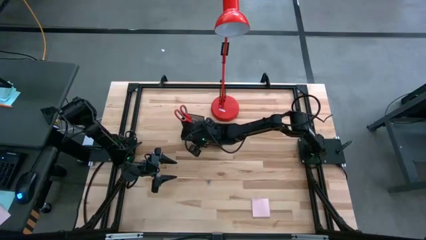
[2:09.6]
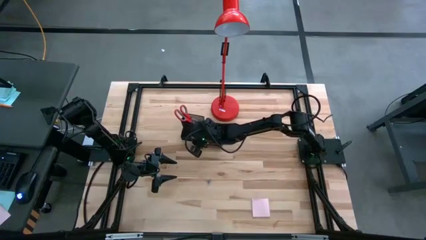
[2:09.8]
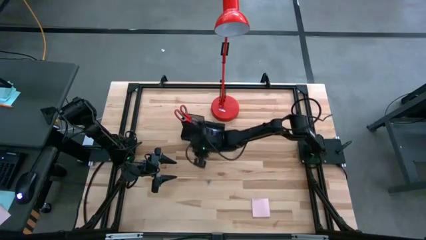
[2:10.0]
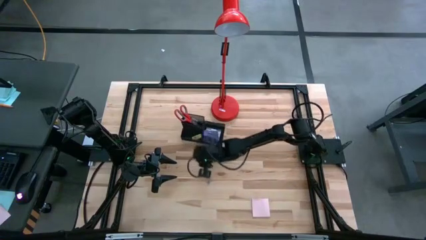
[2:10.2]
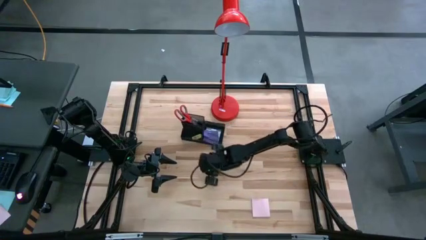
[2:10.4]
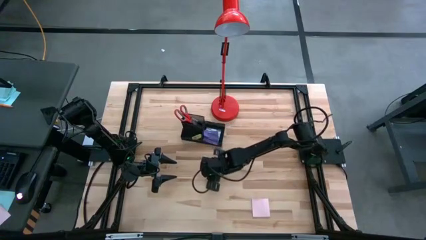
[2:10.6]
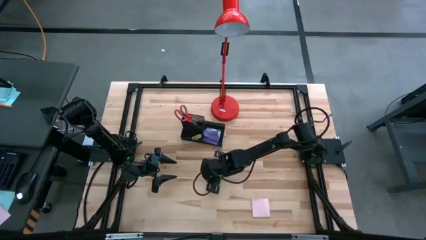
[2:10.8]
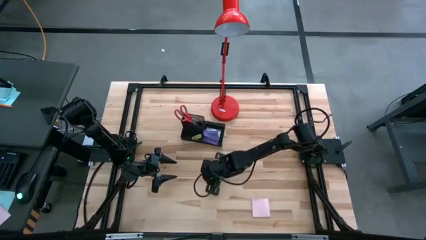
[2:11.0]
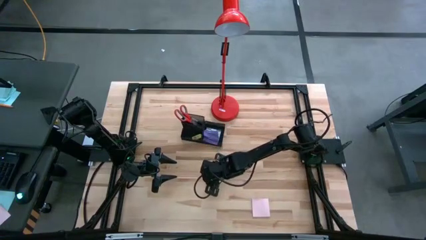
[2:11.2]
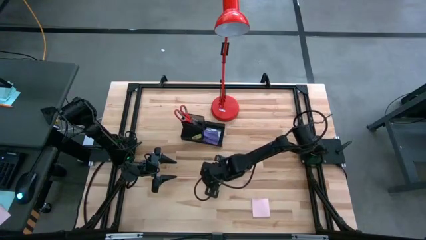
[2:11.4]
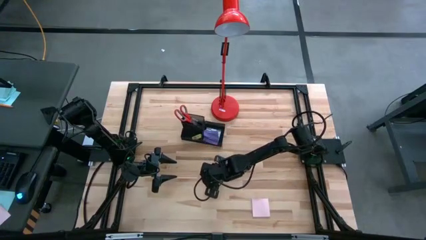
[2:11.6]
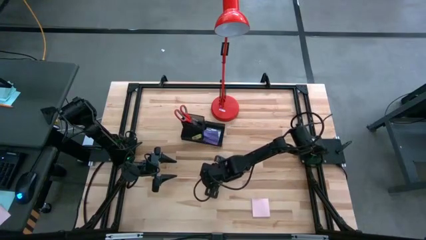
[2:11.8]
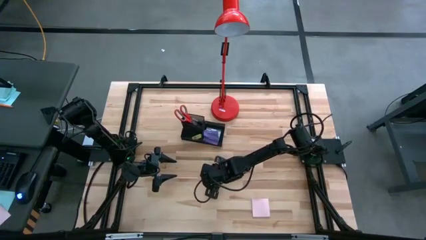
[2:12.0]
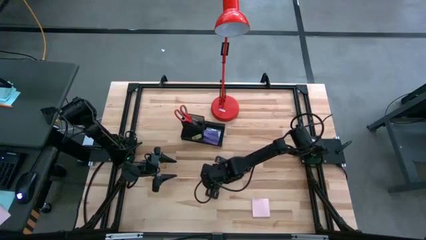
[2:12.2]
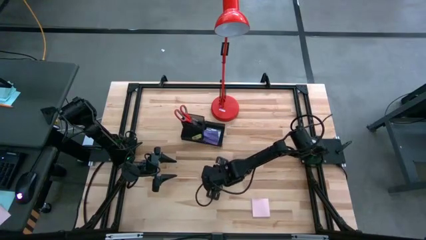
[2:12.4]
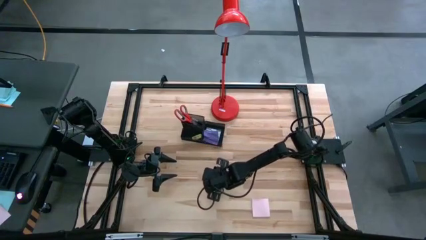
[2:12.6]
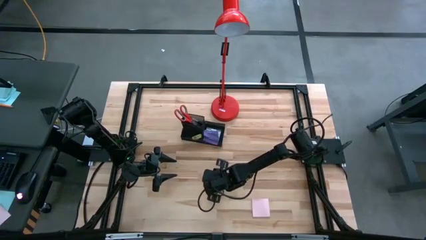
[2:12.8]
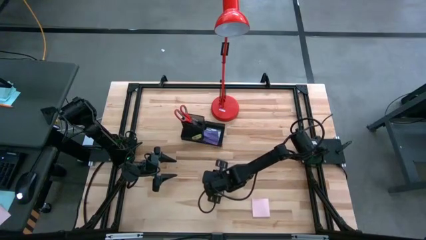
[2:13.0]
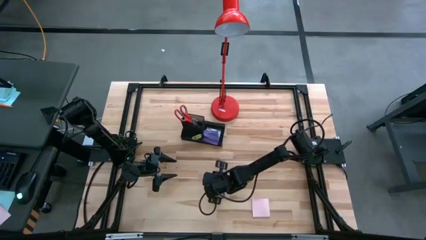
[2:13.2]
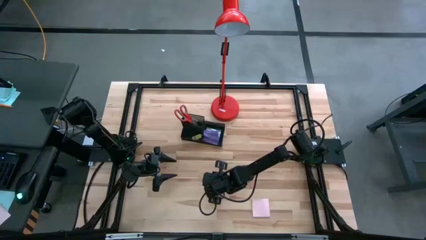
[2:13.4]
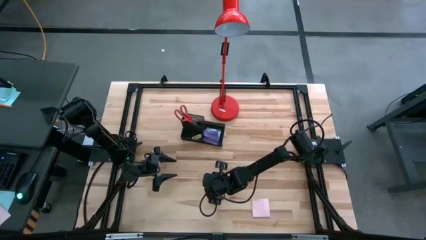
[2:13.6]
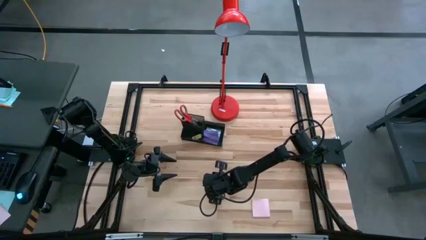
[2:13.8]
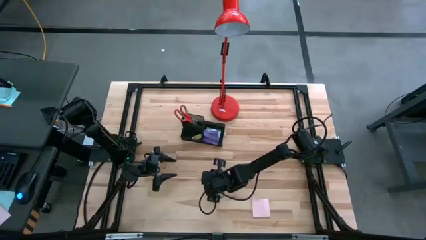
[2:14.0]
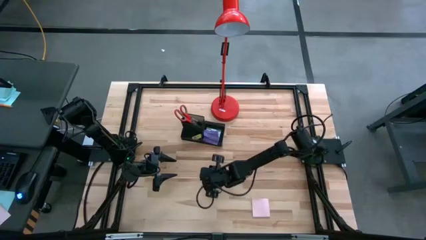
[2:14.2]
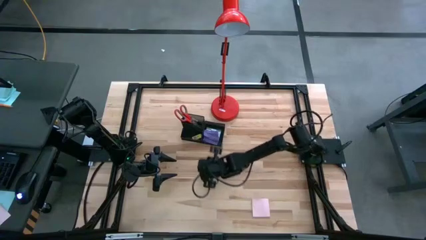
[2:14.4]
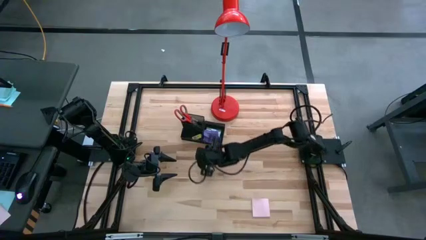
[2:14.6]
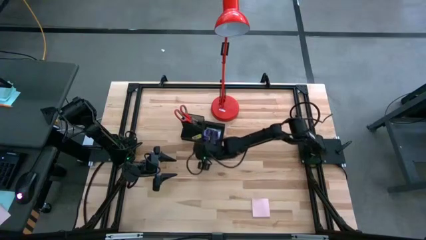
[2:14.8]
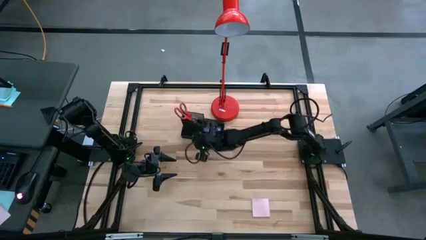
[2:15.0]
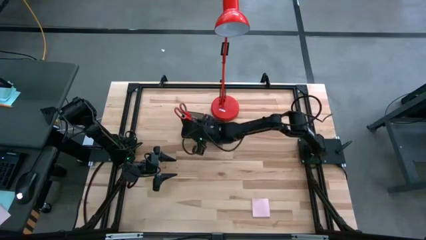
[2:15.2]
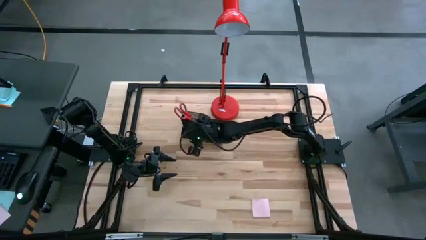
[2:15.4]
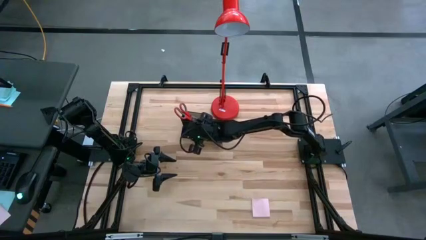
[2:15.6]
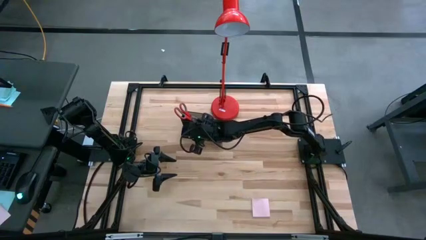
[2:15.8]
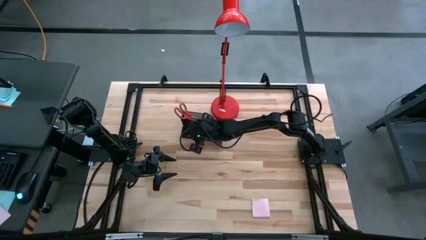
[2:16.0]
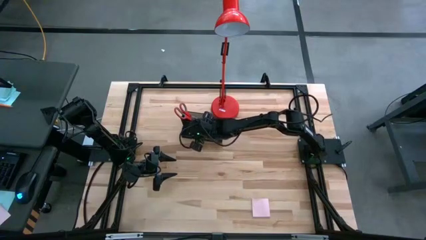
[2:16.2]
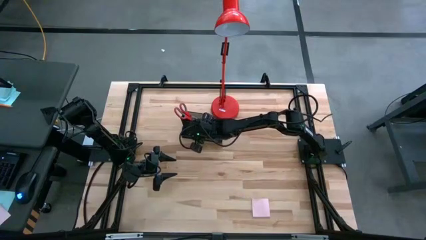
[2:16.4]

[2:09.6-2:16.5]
Task: Pick and place office supplies into organizer
Put the blue binder clip into the desk organizer

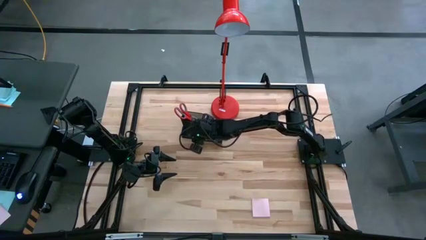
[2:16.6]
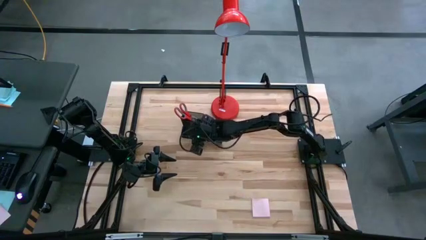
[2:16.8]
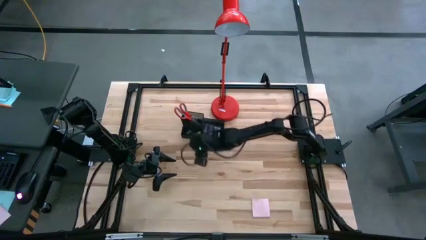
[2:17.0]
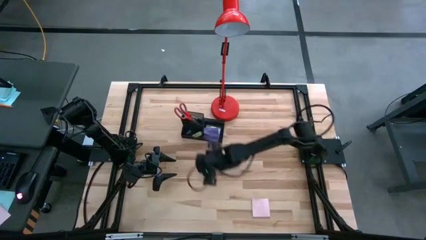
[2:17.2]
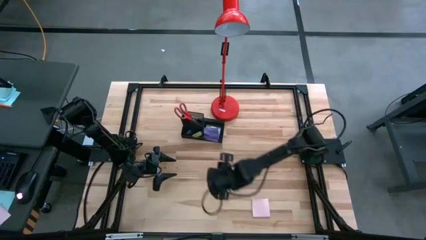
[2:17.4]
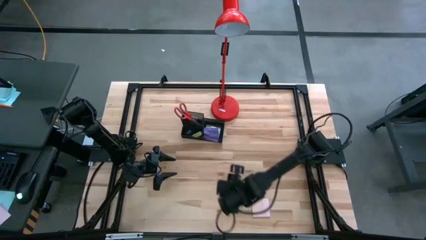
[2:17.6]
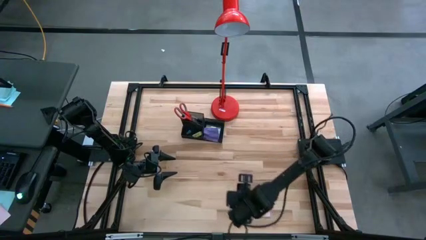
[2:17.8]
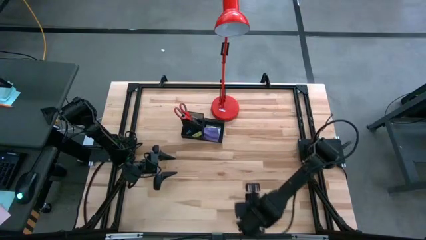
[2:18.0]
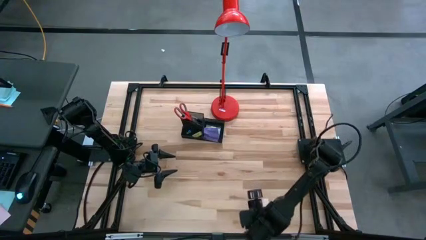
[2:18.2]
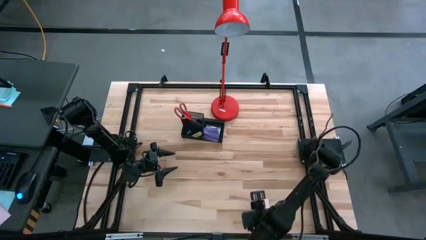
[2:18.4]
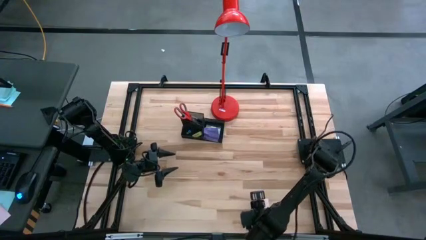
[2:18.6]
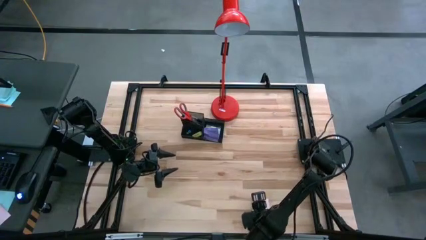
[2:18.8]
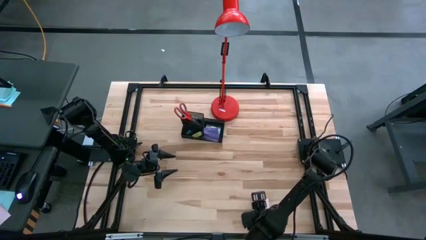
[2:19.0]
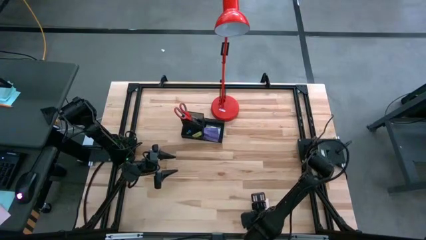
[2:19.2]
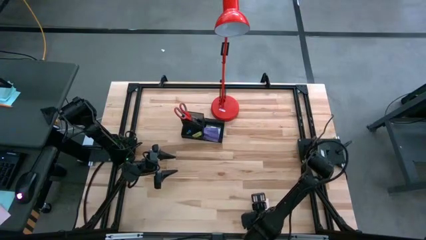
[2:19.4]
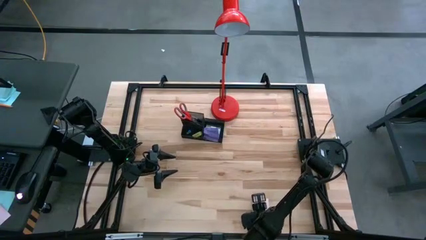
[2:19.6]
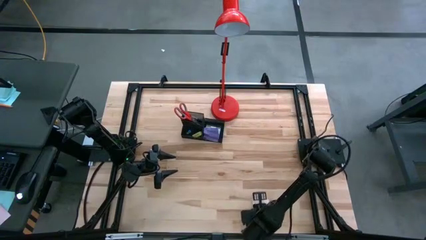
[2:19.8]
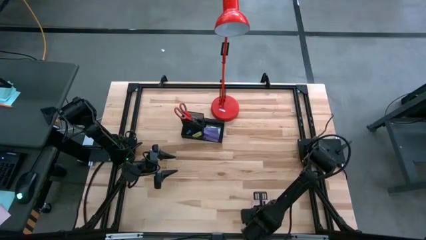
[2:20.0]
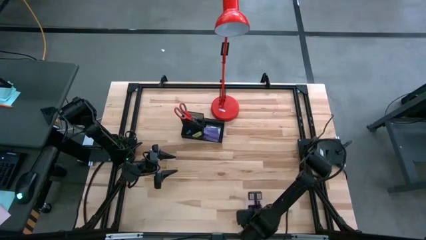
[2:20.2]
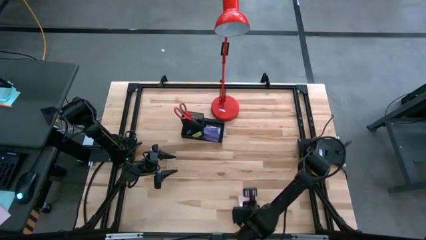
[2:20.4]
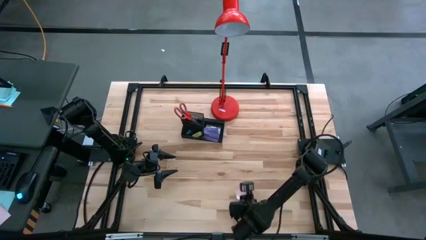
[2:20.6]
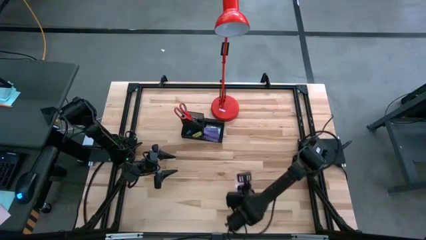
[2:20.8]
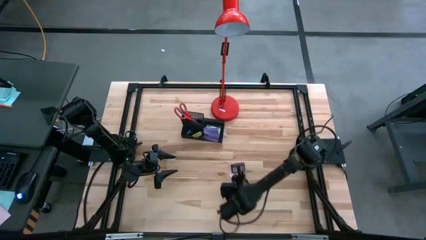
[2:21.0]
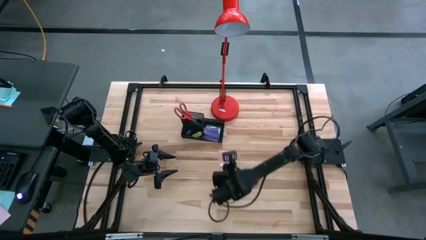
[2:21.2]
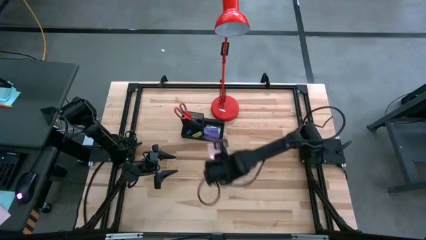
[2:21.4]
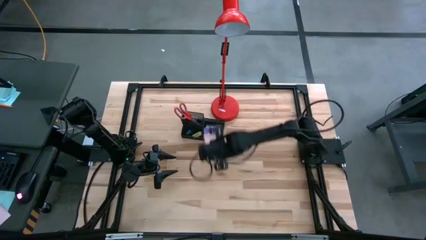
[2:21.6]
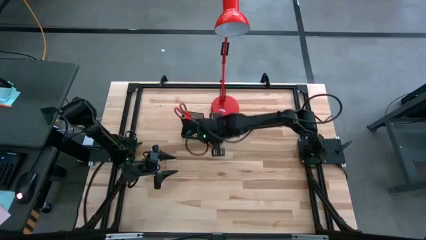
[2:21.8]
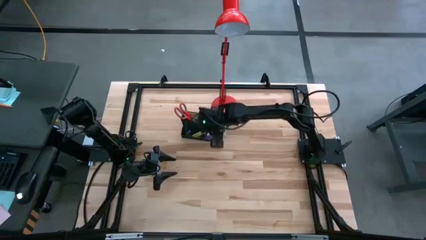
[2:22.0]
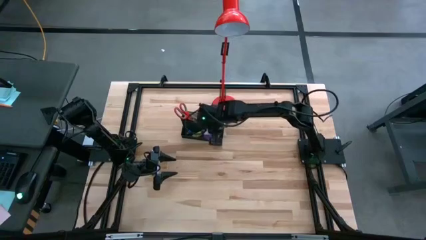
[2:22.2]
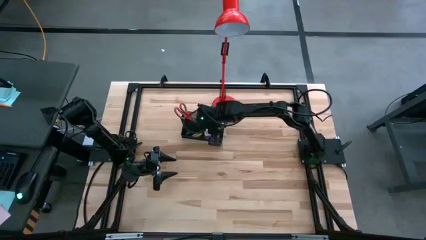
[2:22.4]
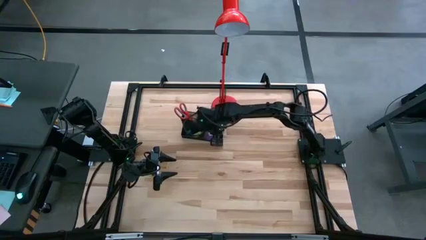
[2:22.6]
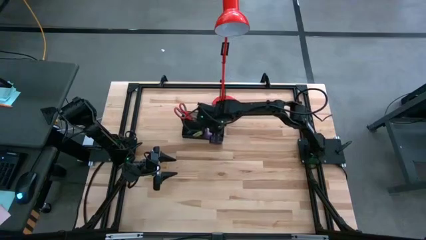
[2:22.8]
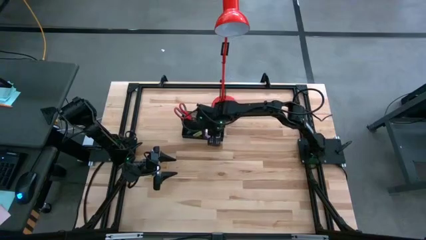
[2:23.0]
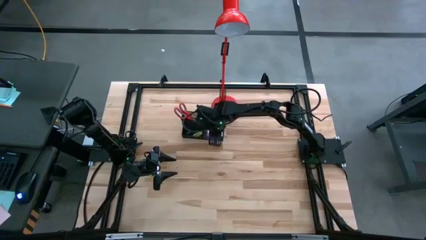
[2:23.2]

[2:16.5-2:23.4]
Put the light pink sticky note into the desk organizer

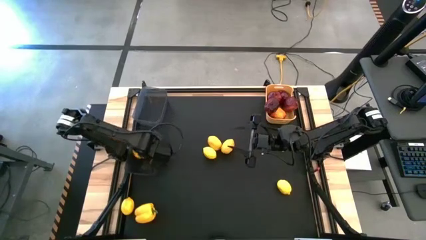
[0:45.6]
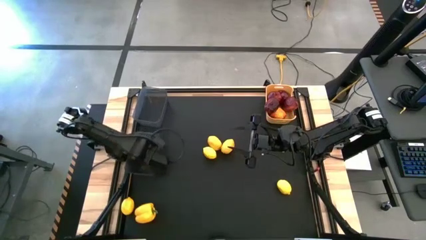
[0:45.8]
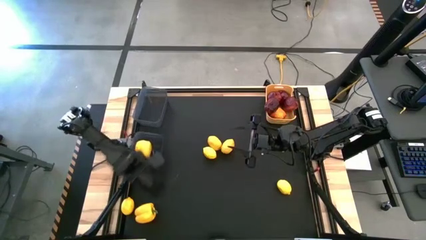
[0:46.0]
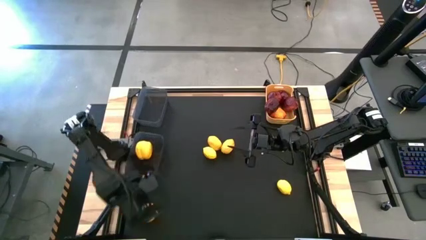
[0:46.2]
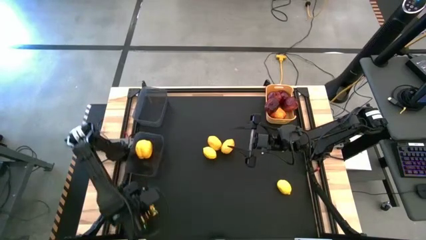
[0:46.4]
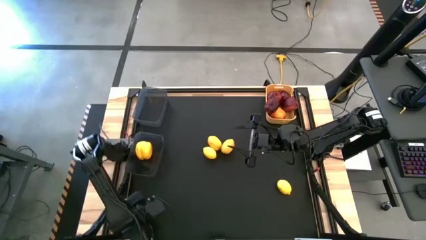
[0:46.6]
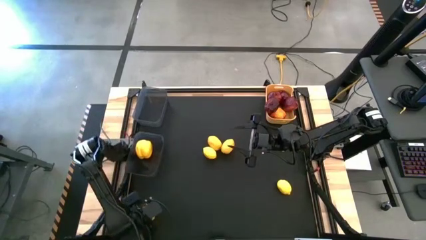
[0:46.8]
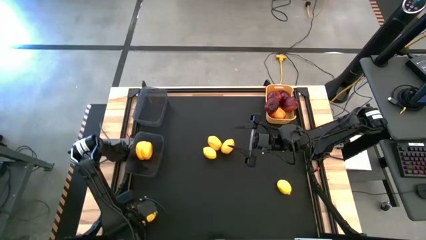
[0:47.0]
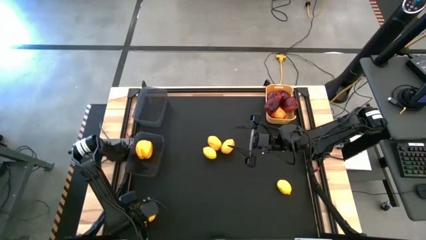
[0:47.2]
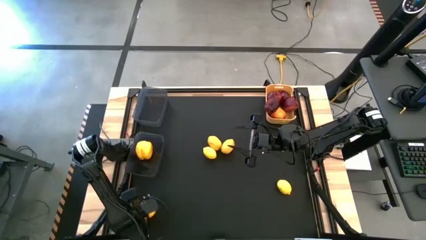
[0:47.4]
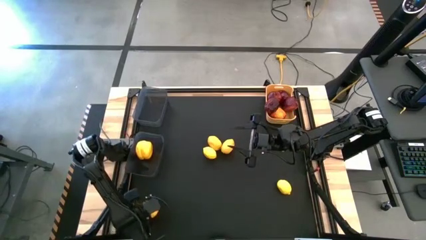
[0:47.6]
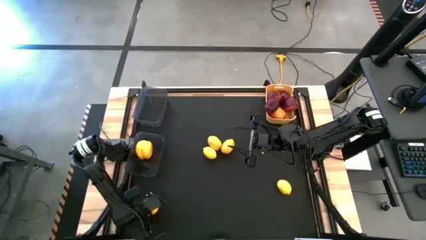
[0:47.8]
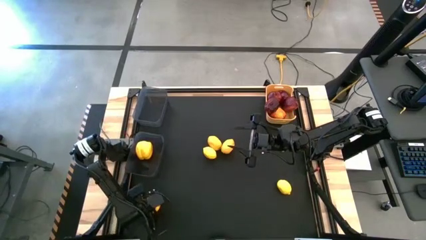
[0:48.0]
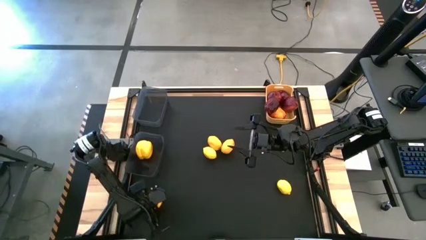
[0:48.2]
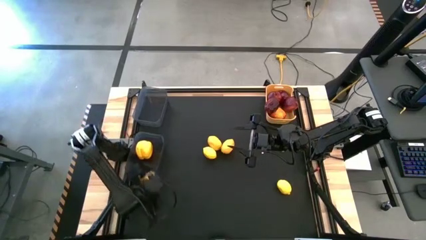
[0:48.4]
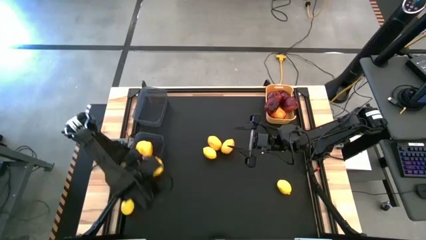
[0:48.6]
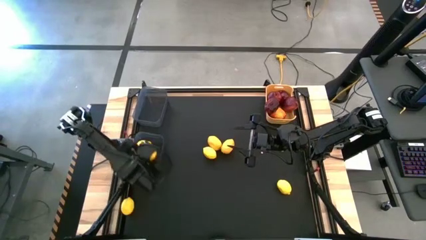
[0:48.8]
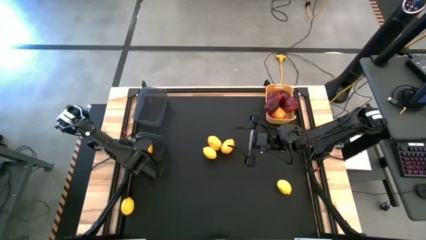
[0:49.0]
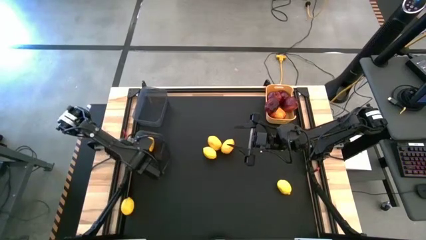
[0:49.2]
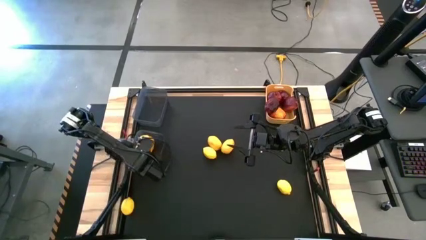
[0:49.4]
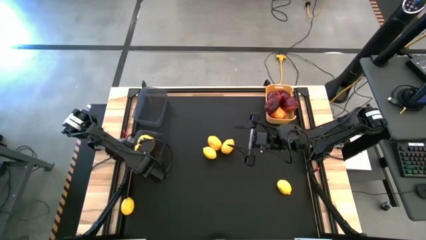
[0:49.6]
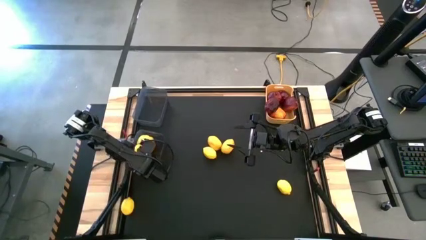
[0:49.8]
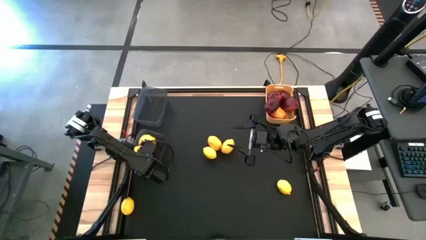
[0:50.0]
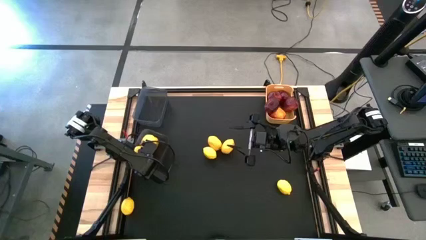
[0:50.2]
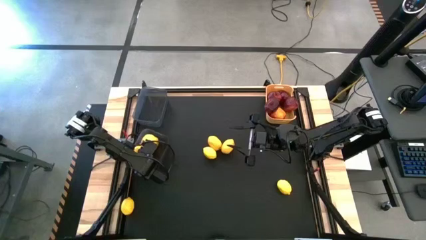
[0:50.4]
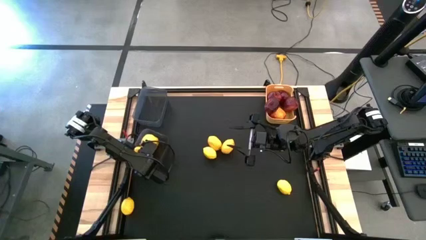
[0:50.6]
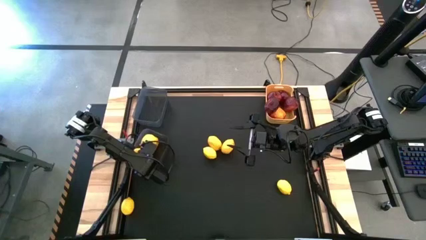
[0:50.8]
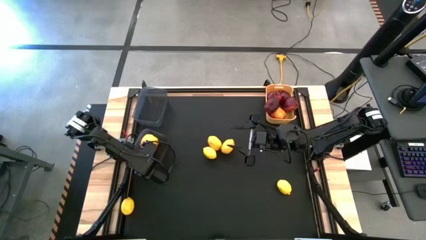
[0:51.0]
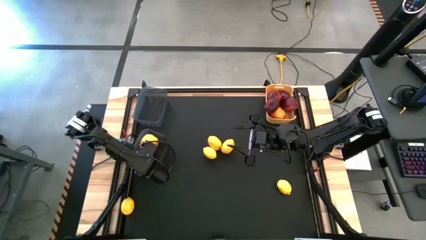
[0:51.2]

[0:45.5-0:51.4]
Task: Sort produce into baskets
Put the bell pepper into the bottom black bin
